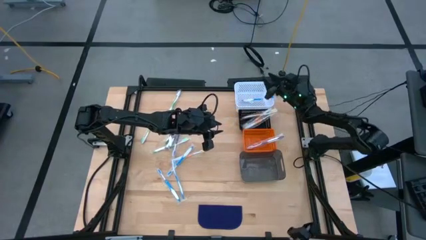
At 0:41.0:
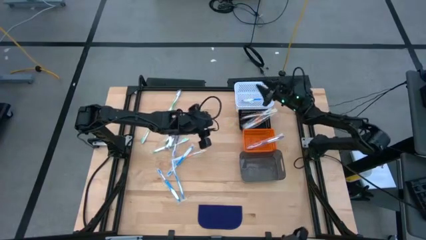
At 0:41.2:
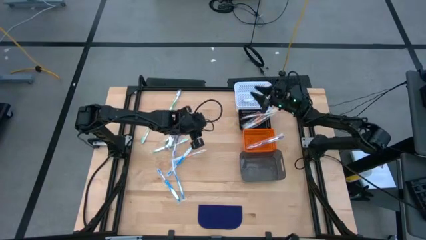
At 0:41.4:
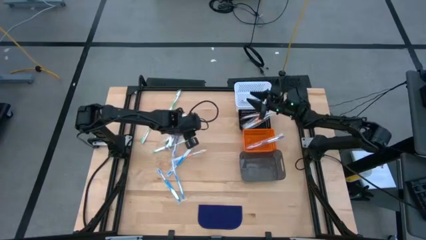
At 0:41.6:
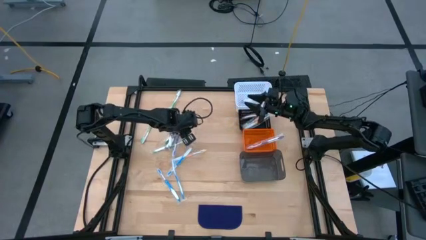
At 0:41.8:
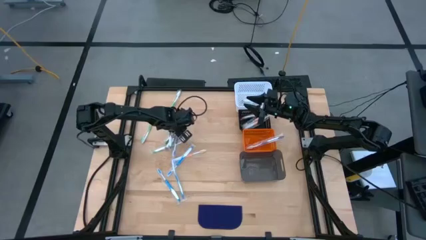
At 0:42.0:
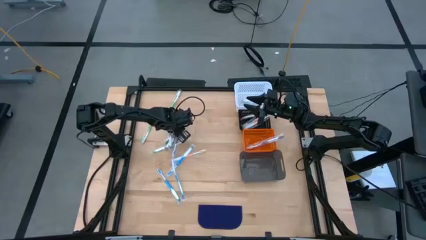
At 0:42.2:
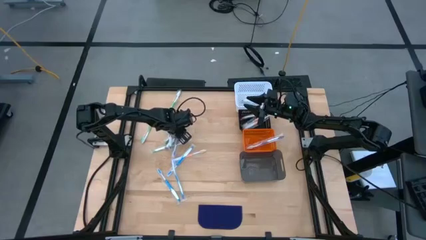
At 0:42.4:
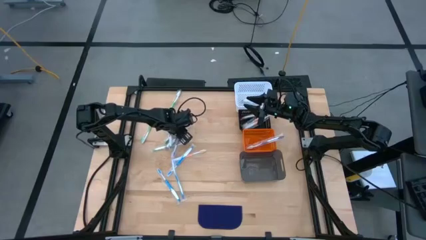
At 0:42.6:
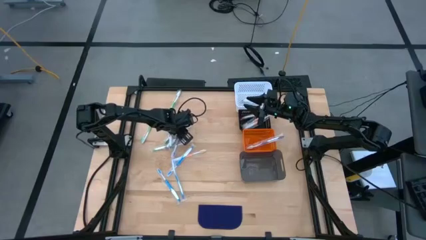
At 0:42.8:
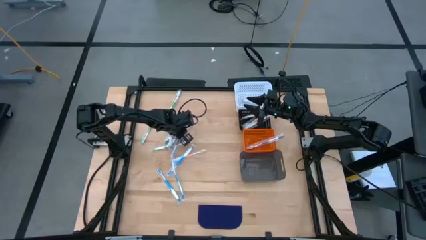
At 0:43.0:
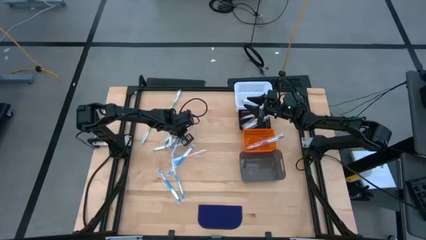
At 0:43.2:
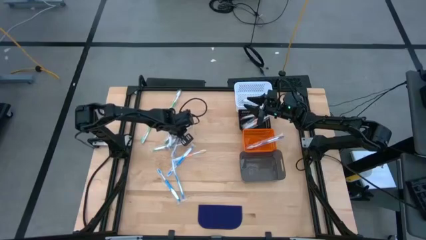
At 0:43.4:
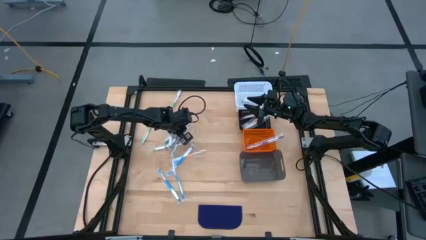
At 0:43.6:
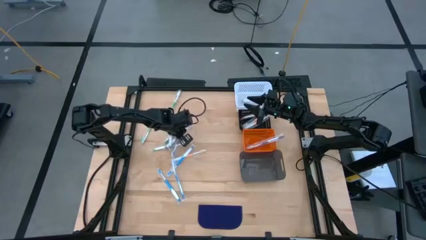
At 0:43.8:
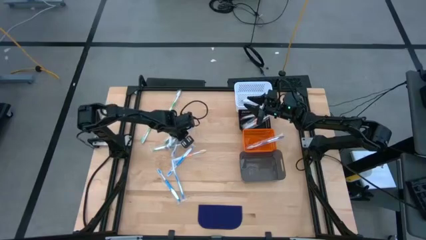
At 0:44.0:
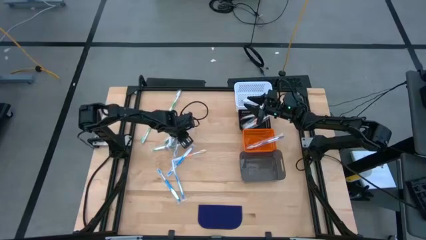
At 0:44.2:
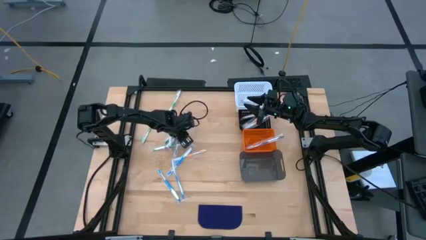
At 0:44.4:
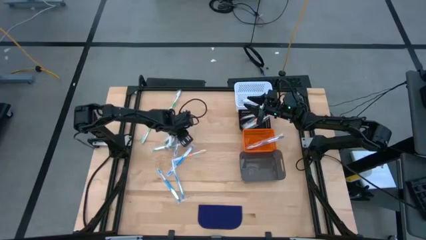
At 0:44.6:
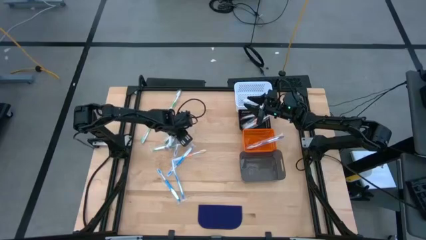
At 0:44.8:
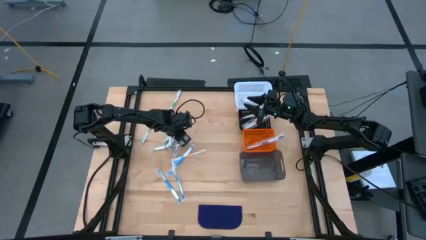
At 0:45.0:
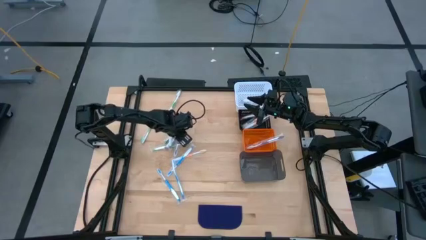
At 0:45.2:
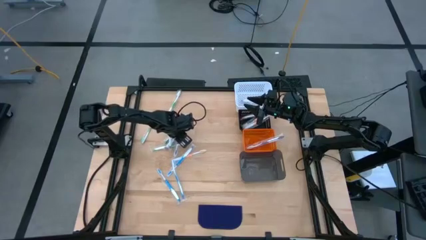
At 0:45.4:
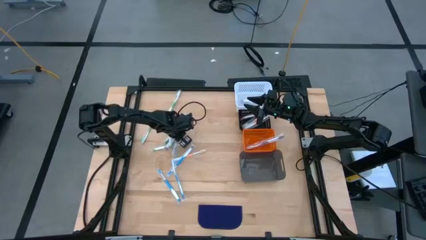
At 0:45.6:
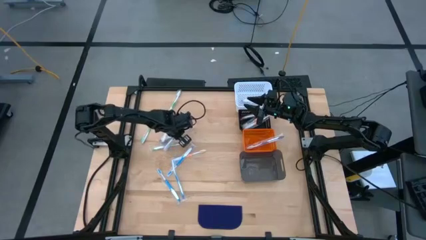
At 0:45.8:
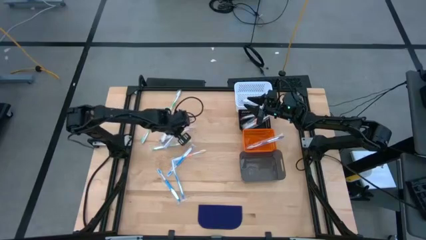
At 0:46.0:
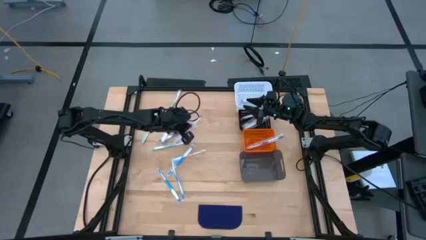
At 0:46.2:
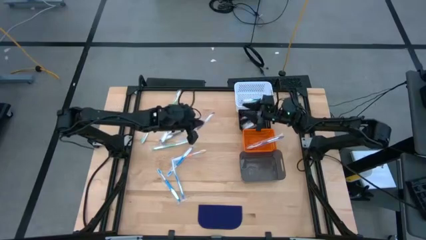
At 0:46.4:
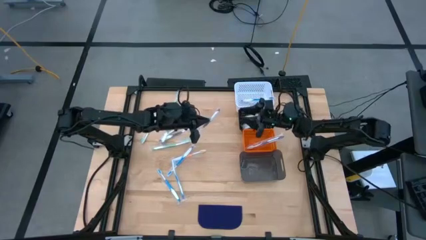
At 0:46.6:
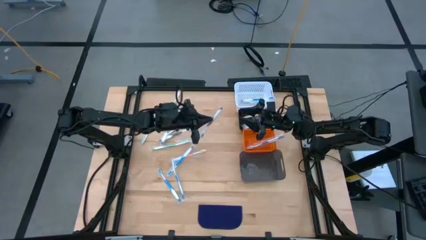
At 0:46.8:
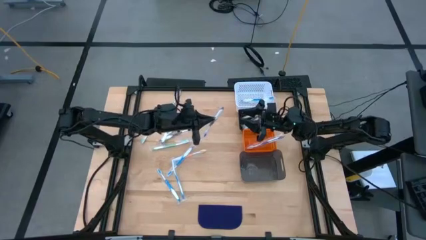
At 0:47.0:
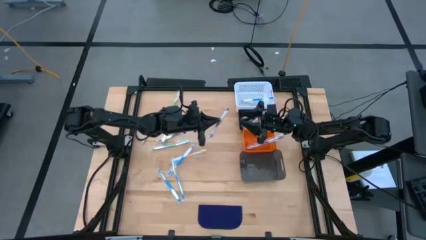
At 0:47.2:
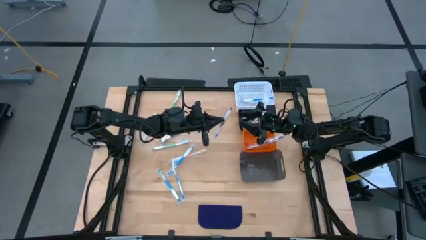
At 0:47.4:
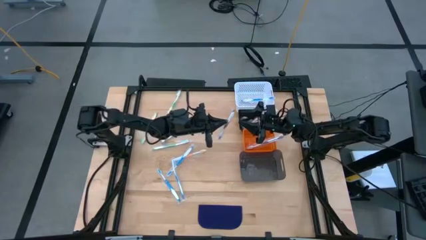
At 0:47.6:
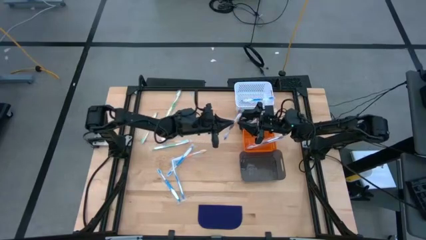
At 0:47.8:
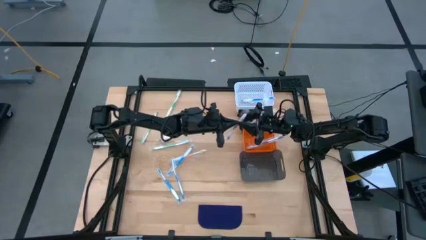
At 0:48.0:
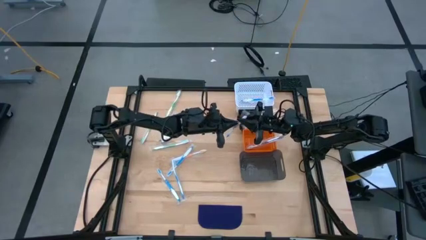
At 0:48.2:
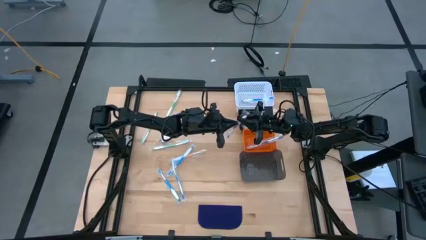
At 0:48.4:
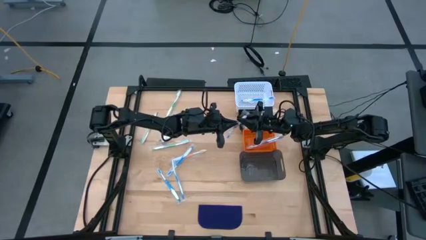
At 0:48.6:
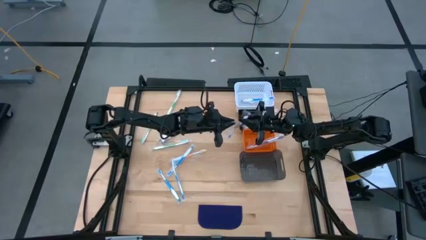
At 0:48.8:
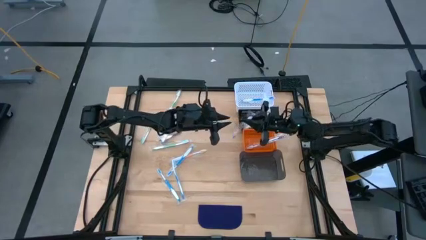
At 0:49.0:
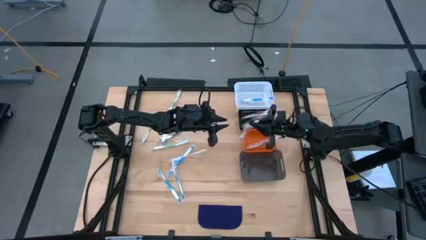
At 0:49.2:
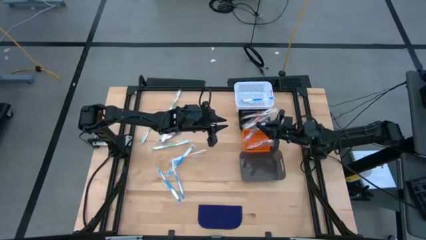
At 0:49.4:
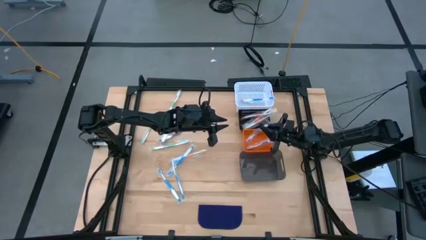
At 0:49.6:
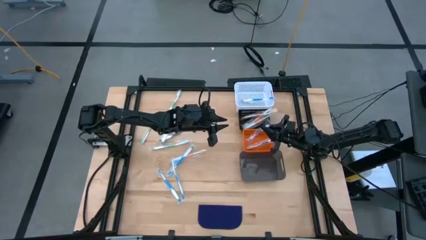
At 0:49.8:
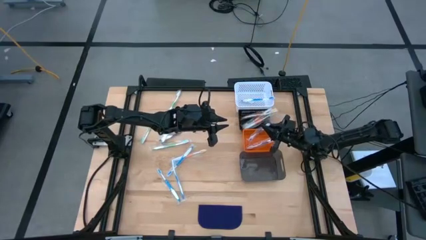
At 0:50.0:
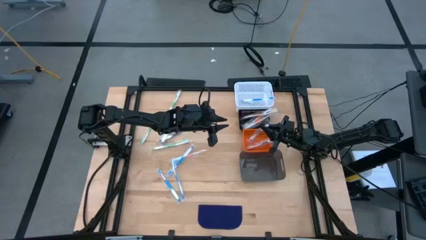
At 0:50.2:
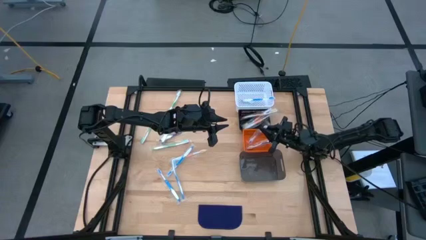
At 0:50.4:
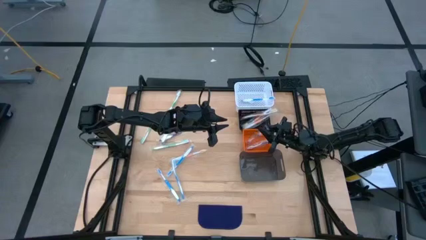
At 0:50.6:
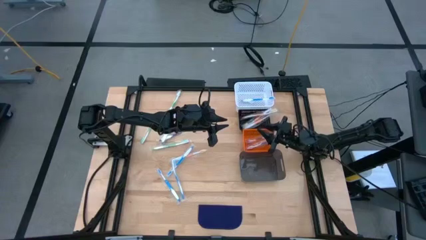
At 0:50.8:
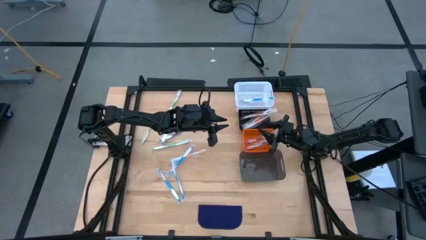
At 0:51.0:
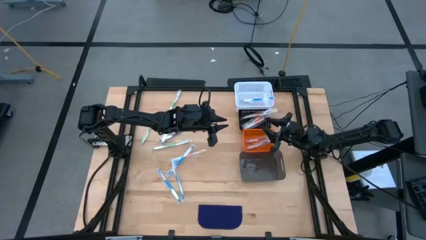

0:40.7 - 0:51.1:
Task: Pick & Place Toothbrushes
Put the purple toothbrush into the orange bin

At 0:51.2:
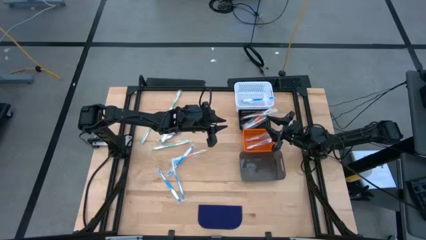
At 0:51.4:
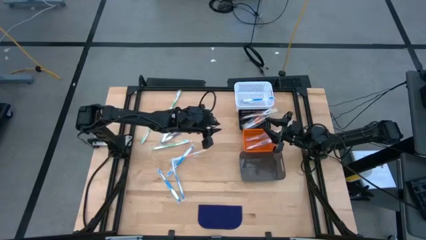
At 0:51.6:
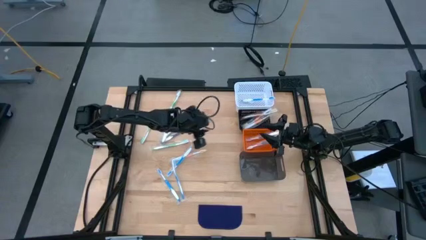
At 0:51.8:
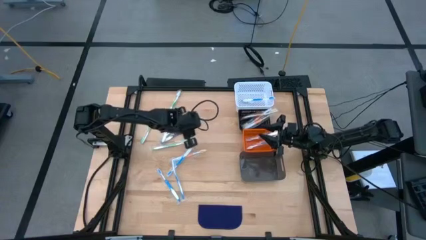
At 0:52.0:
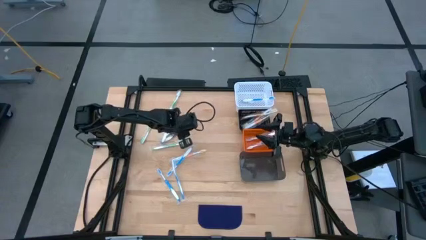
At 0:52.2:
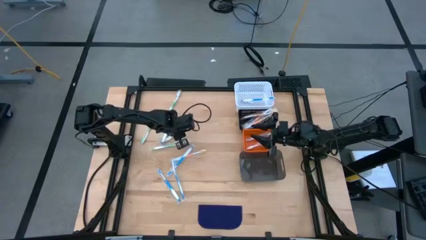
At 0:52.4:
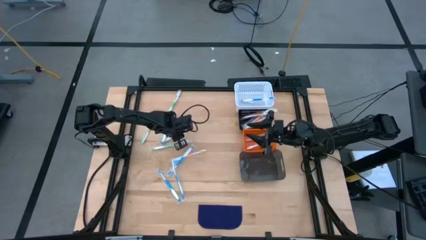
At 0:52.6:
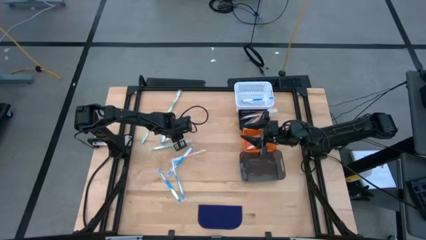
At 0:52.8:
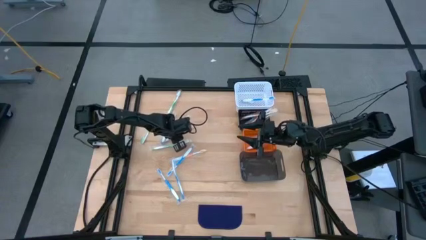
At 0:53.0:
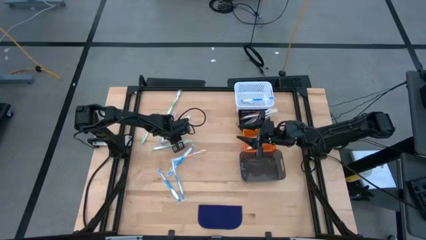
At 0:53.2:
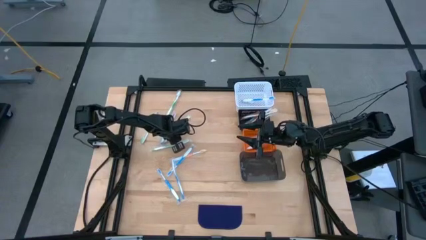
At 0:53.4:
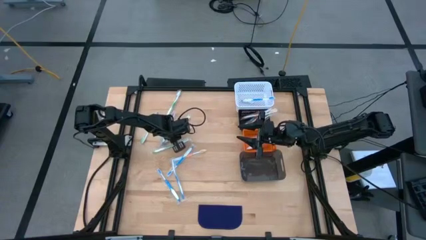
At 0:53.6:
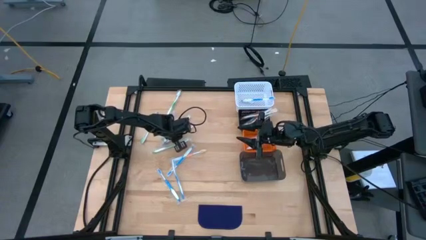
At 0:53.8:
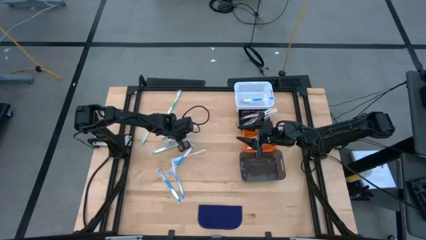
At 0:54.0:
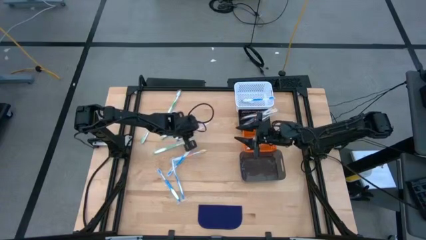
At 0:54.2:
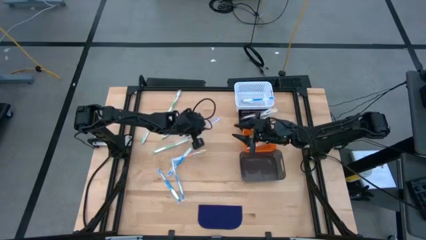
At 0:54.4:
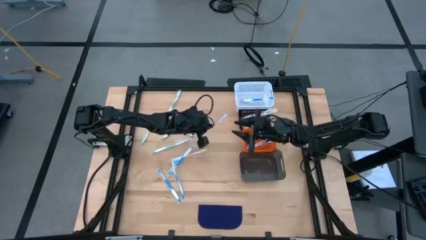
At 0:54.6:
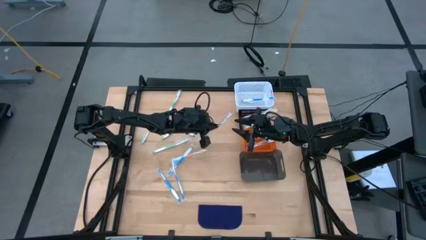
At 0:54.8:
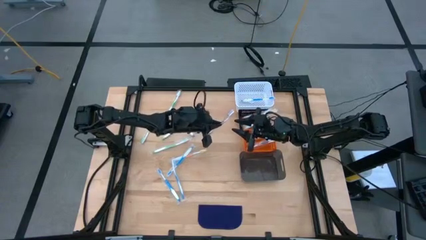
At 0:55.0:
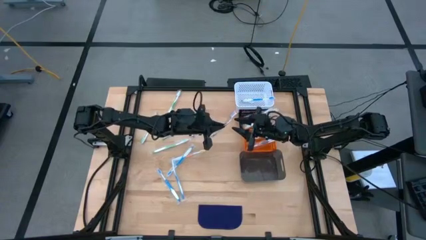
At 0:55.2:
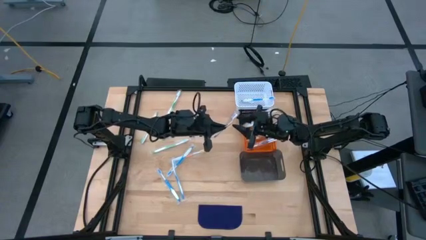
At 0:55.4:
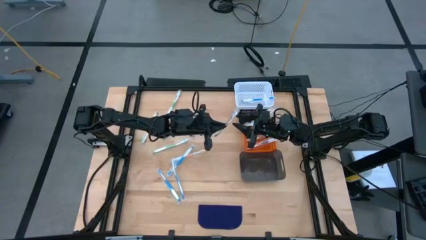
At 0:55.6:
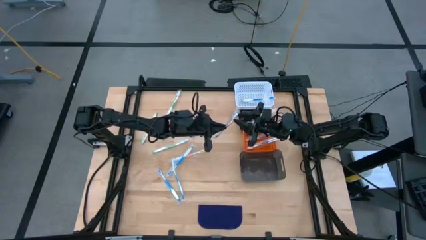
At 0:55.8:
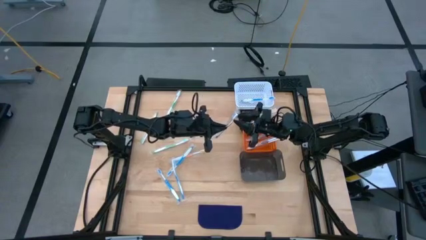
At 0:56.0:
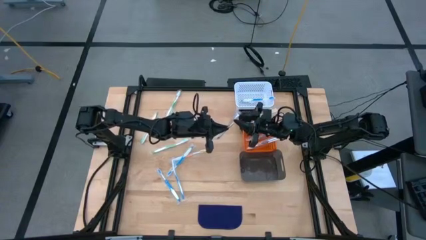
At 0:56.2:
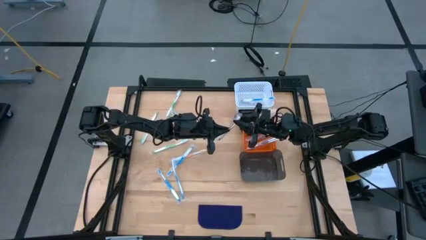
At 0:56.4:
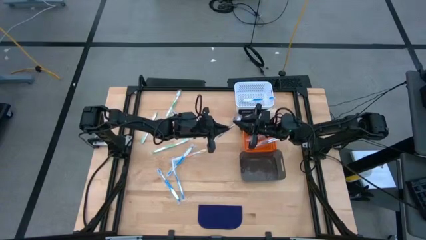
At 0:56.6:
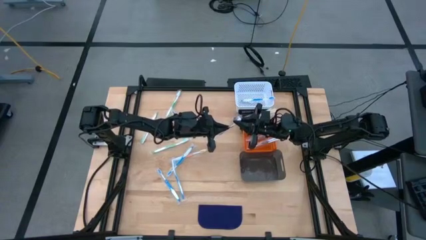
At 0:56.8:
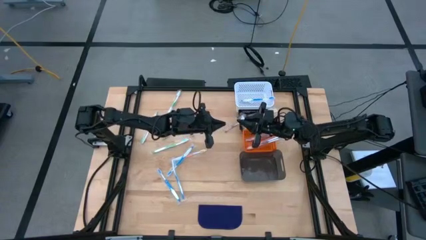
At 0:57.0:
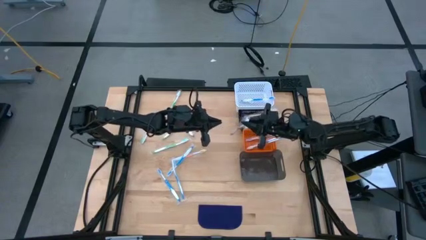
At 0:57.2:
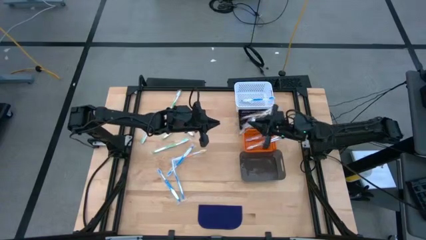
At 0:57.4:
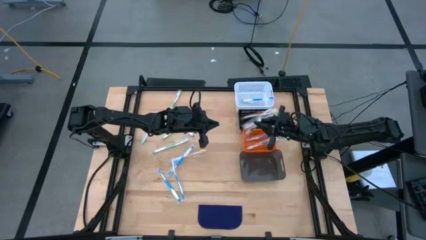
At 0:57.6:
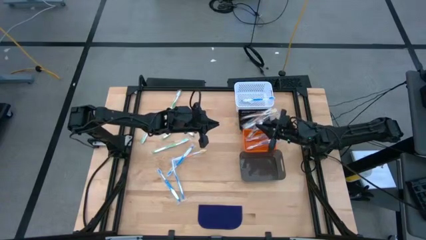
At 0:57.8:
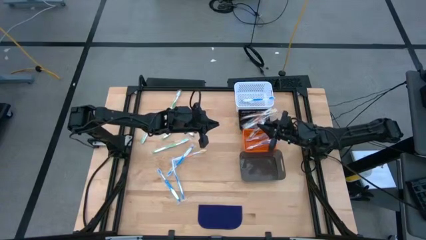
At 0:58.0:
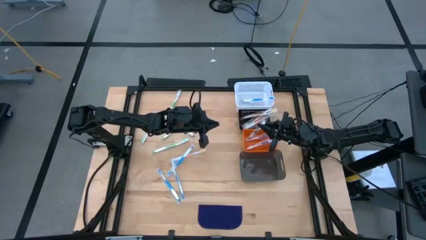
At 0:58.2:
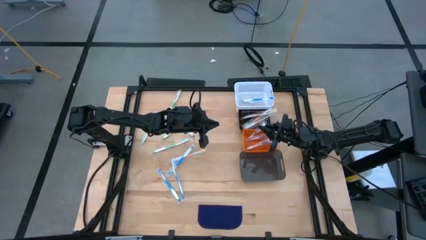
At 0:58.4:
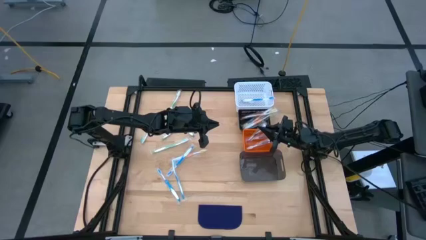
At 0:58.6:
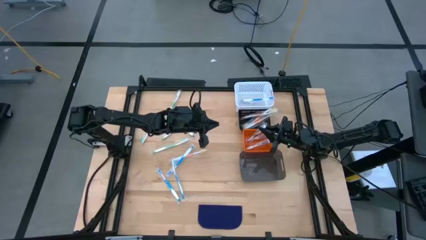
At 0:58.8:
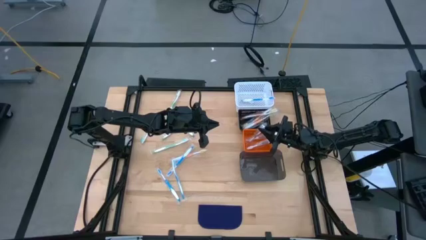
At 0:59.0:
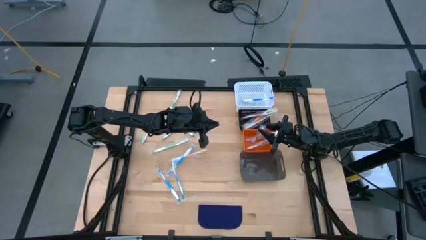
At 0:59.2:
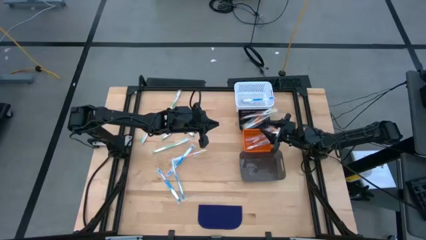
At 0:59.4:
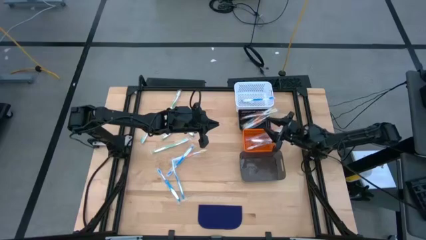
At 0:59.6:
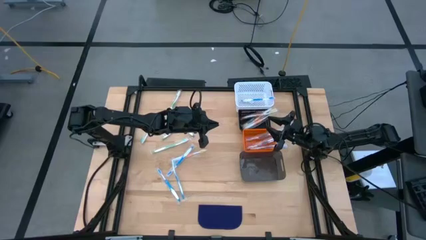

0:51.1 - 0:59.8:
Put the purple toothbrush into the orange bin
